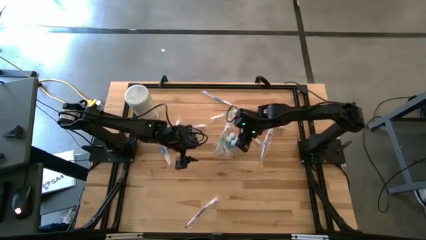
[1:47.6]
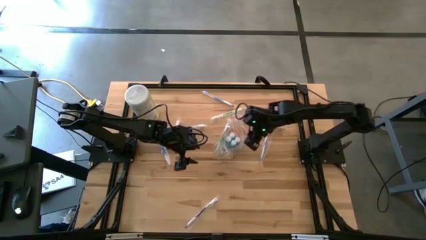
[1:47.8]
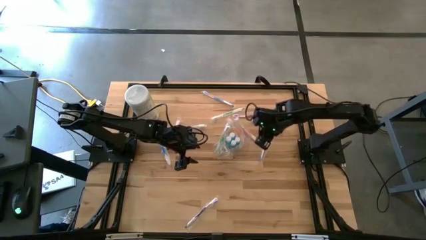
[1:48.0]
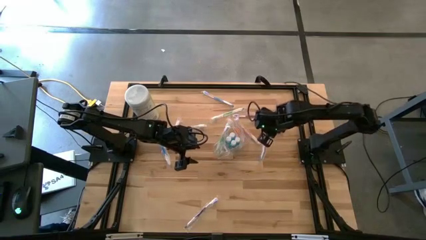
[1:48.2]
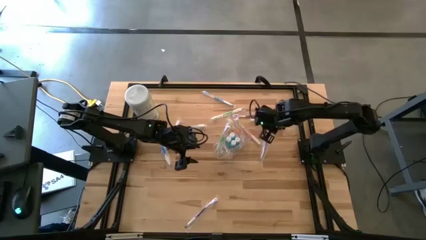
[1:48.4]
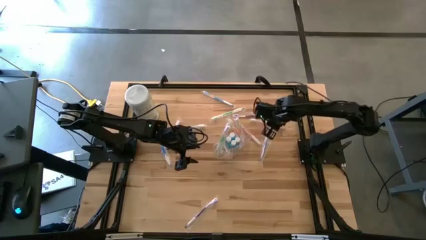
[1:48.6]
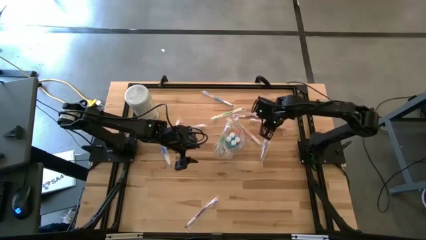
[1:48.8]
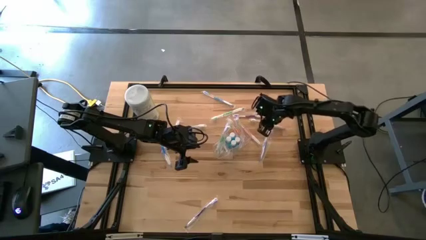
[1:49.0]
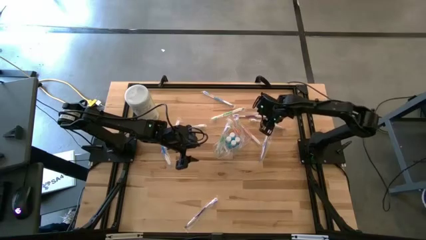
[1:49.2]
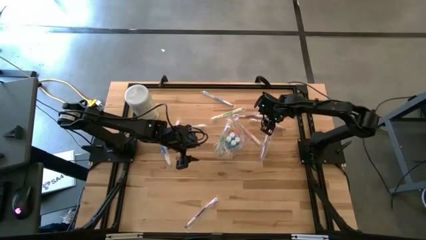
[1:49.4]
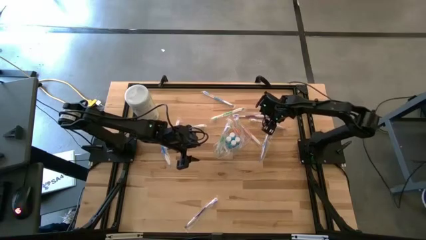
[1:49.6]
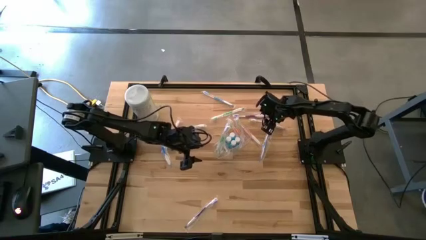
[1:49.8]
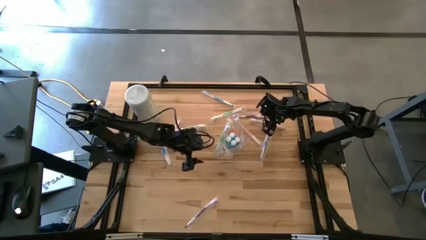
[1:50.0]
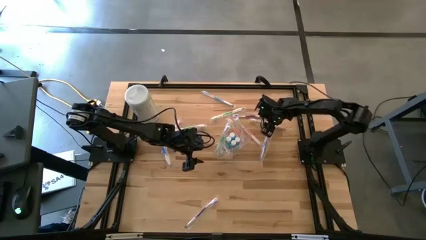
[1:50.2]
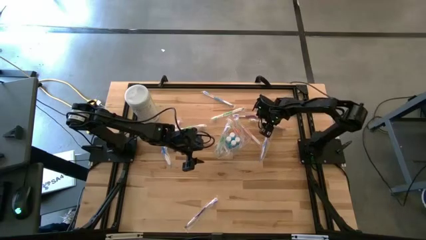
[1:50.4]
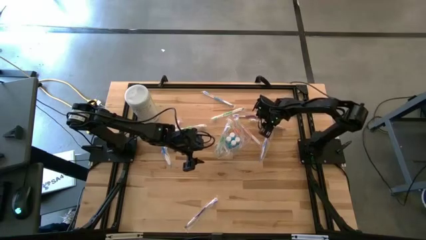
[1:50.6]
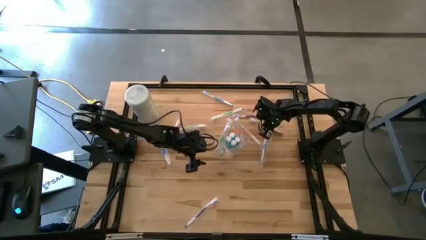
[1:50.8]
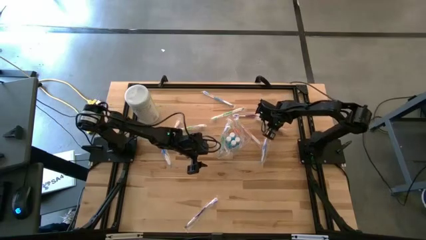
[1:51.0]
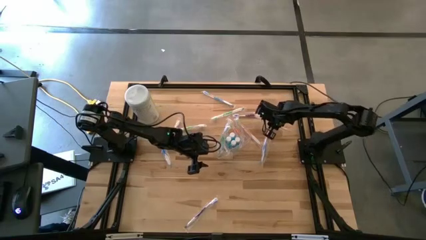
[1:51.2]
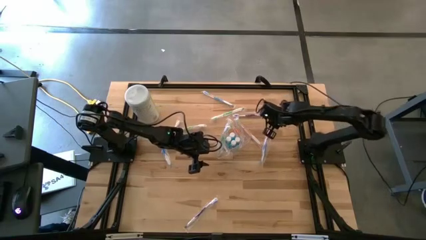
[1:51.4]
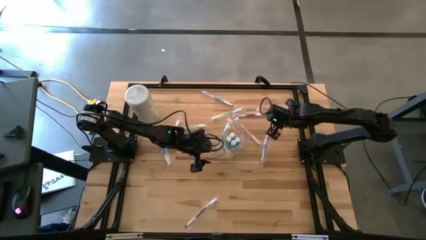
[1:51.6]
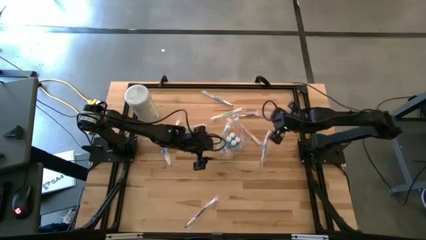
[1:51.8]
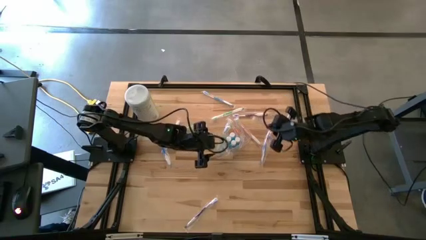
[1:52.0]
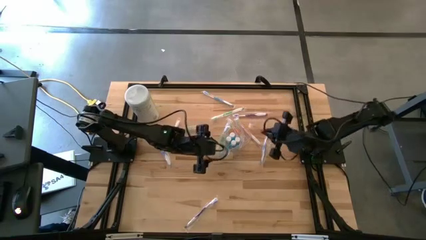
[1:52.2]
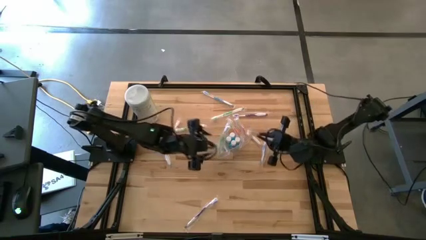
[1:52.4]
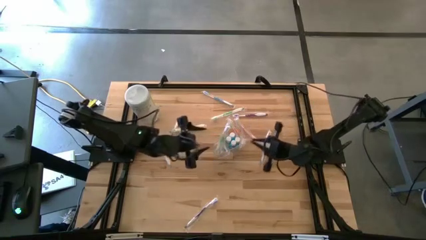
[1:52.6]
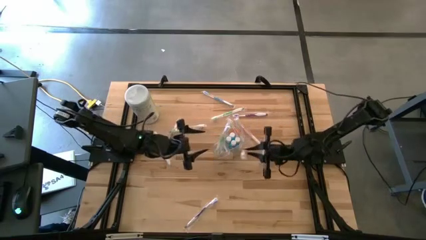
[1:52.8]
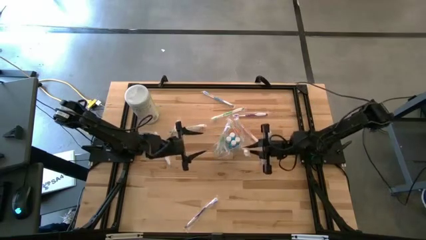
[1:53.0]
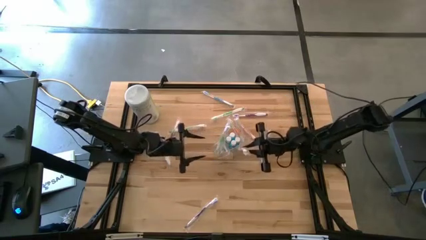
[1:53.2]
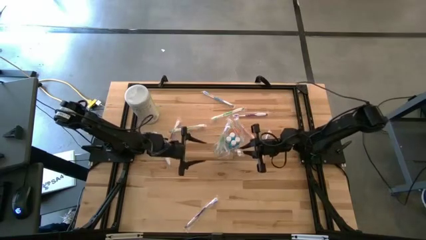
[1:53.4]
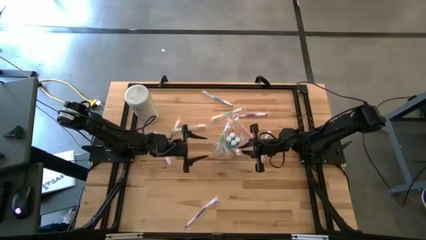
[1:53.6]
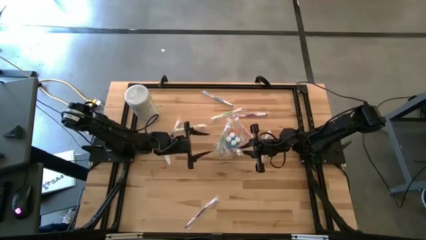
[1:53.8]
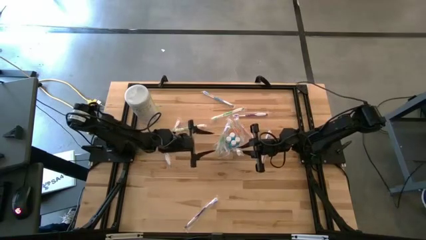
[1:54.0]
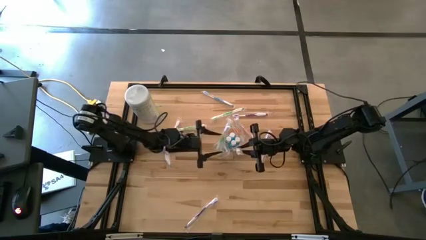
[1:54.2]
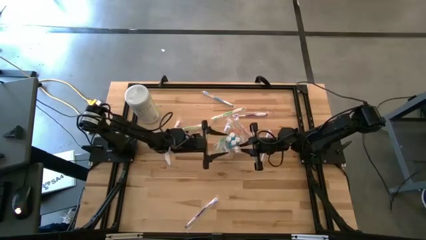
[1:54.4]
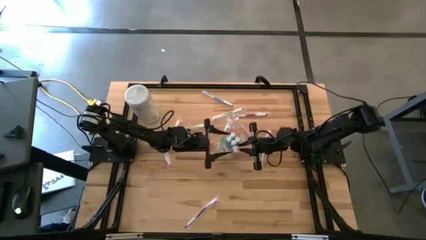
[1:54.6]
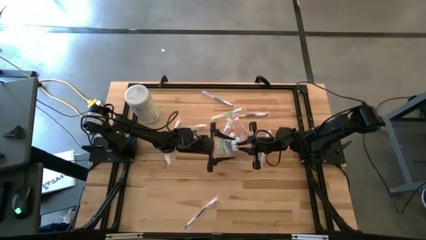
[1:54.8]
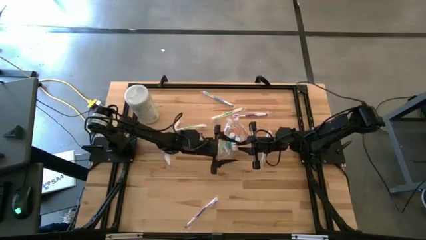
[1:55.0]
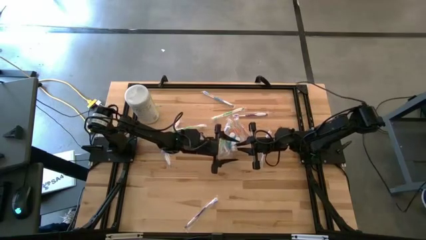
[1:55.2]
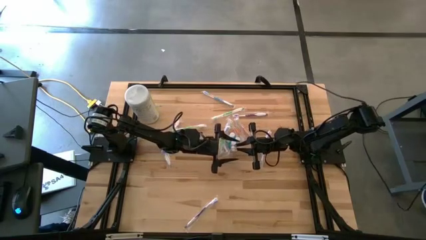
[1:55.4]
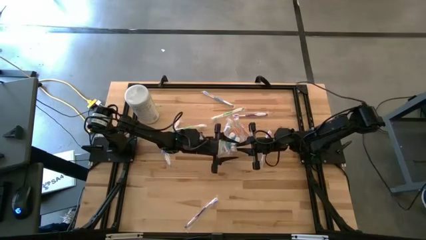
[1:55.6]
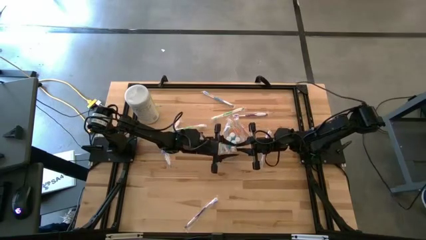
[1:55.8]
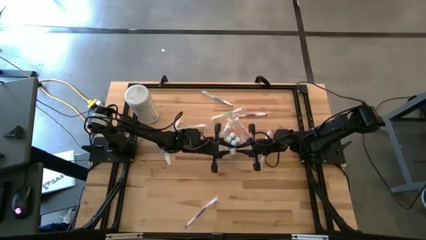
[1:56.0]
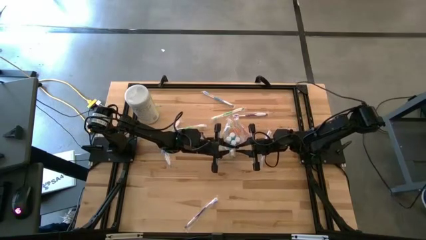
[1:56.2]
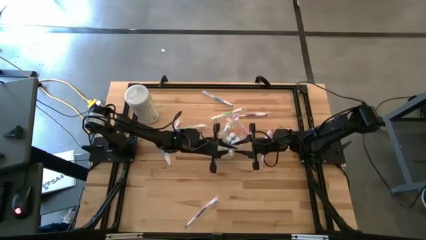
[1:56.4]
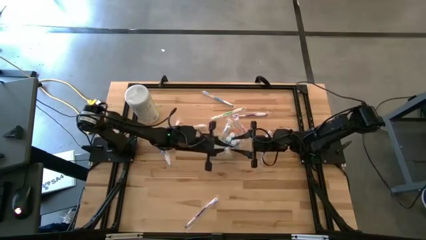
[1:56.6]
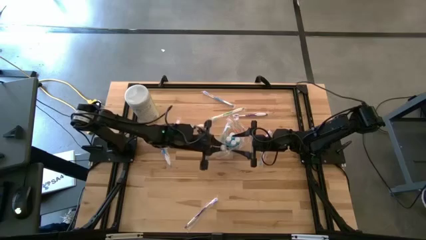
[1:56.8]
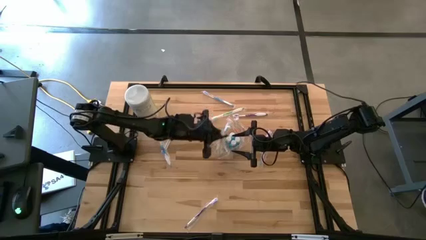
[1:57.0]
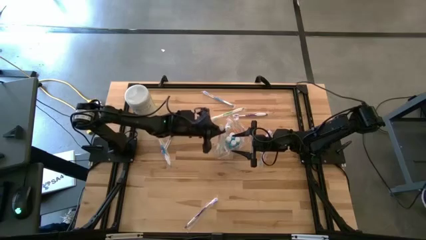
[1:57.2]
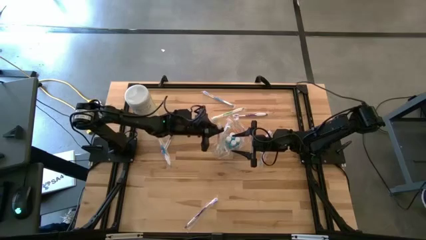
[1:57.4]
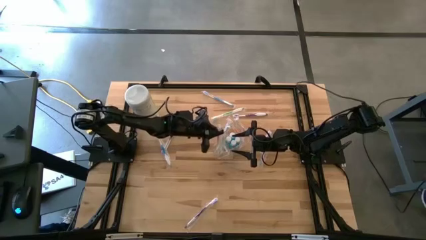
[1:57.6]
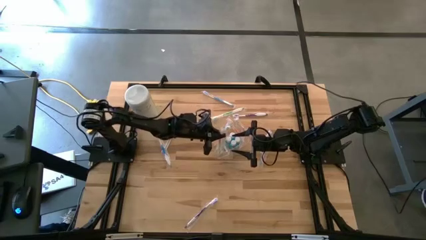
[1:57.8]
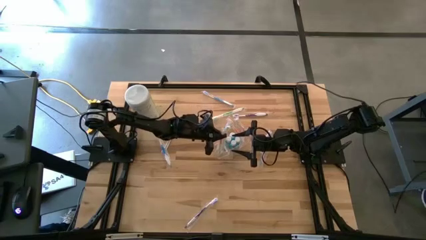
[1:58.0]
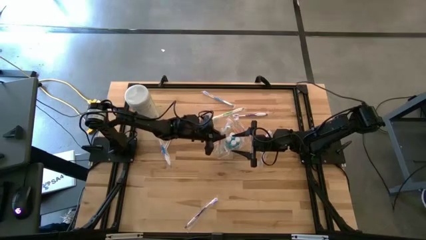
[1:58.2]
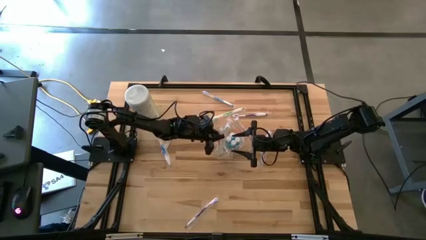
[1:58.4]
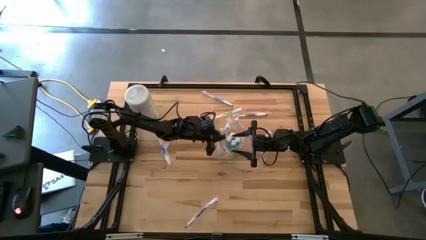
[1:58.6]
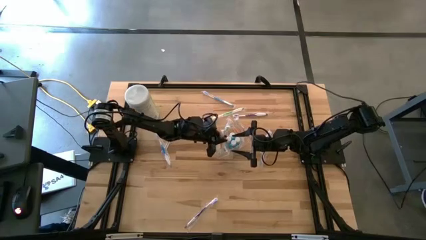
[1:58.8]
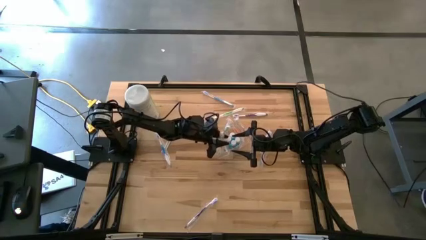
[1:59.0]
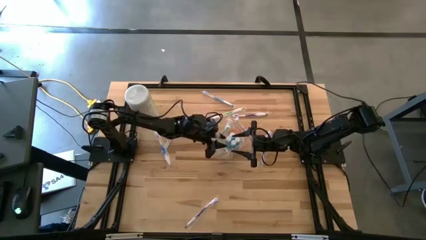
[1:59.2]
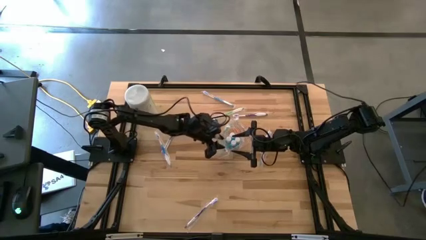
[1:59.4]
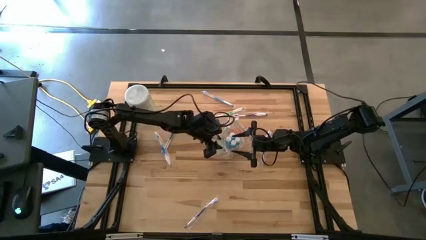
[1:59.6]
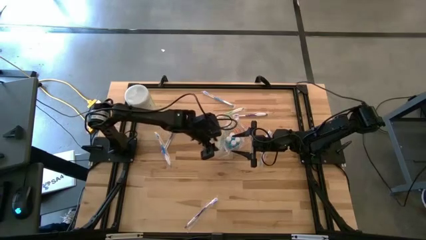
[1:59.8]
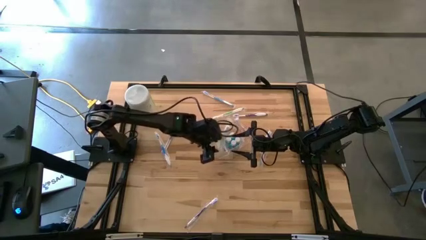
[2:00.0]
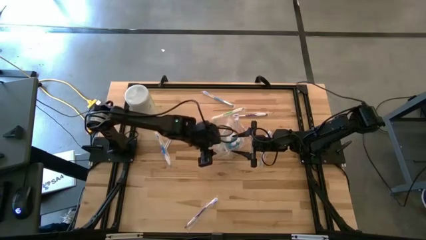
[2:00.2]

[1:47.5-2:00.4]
Task: Pick & Place toothbrushing station
Put the orange toothbrush into the transparent organizer

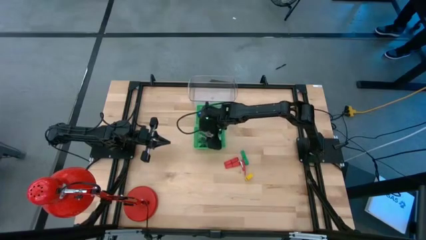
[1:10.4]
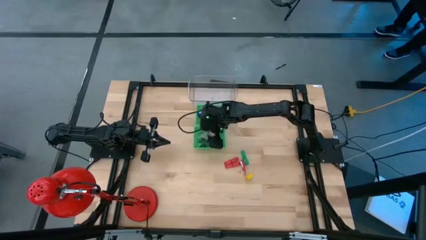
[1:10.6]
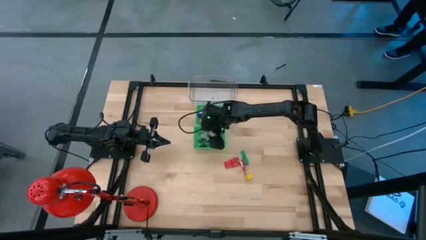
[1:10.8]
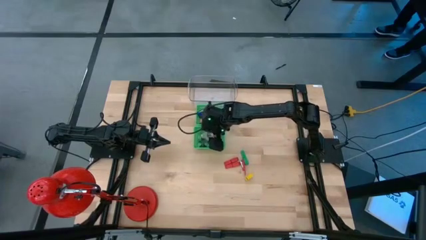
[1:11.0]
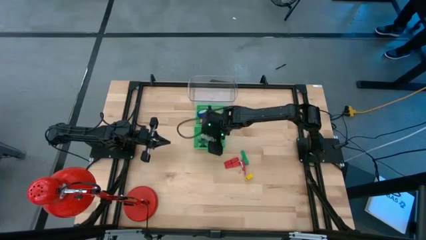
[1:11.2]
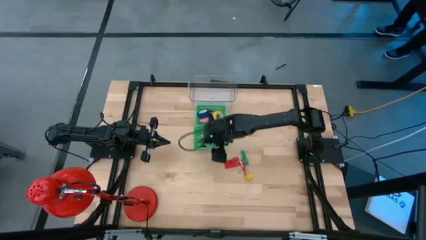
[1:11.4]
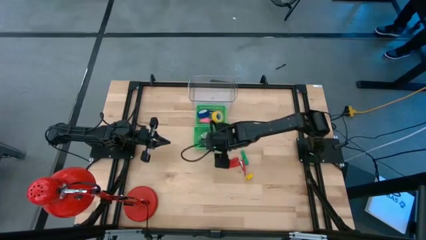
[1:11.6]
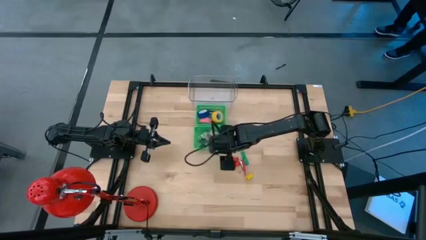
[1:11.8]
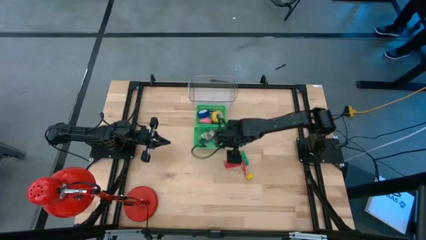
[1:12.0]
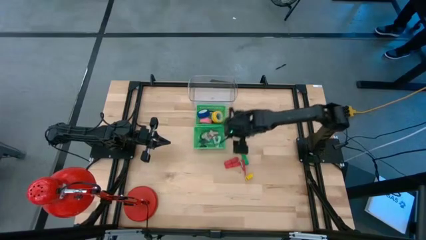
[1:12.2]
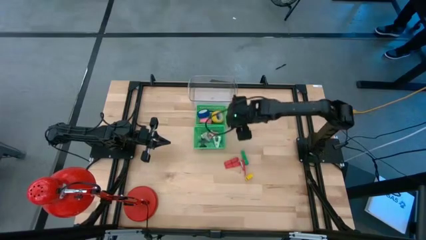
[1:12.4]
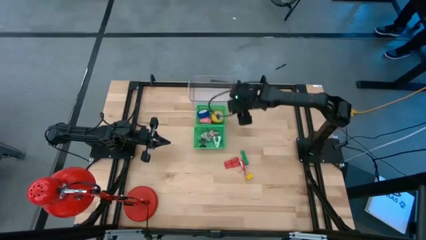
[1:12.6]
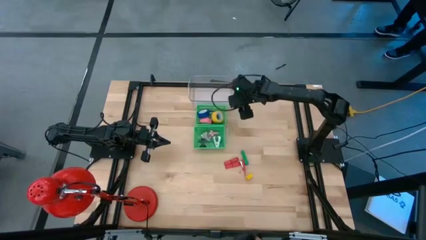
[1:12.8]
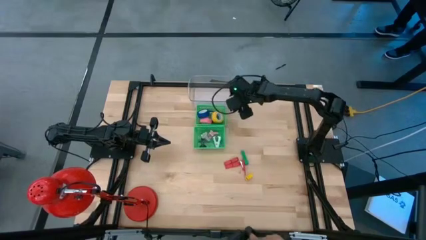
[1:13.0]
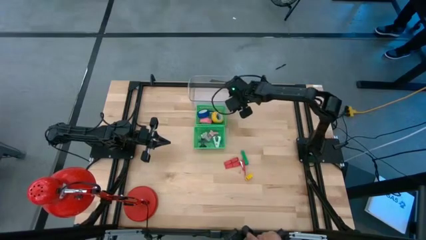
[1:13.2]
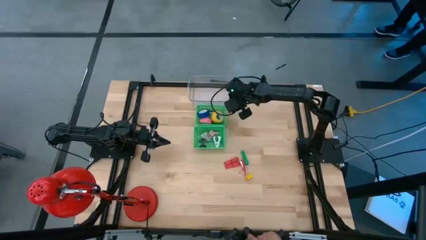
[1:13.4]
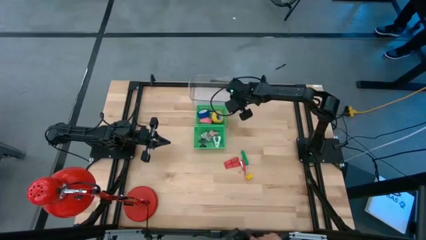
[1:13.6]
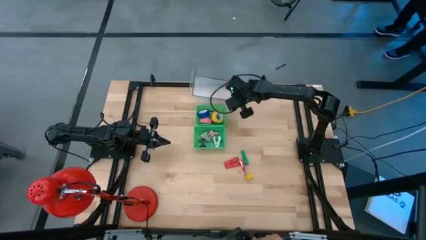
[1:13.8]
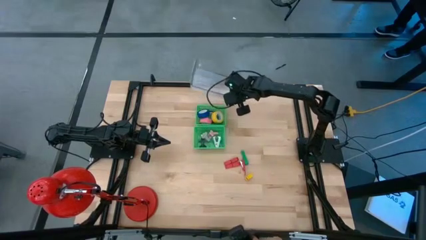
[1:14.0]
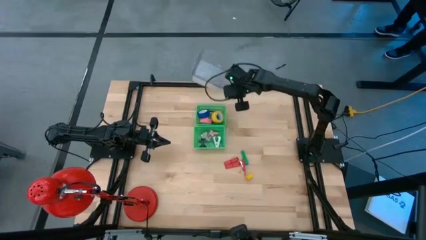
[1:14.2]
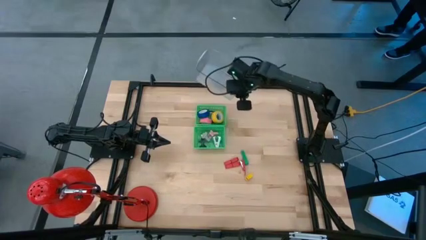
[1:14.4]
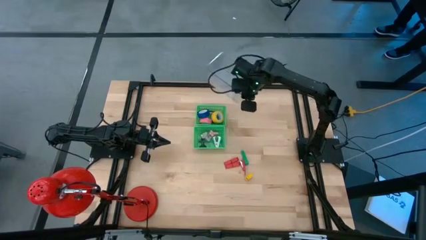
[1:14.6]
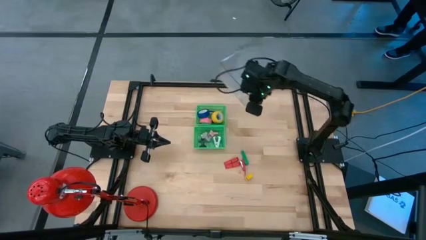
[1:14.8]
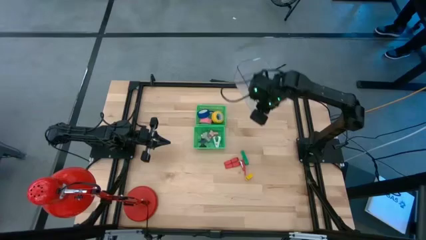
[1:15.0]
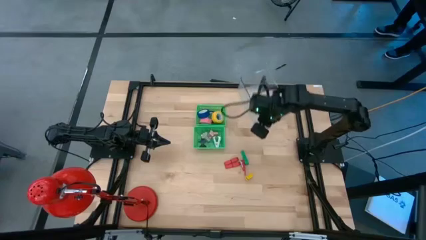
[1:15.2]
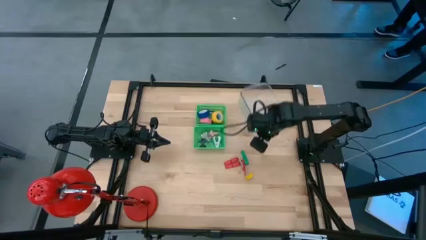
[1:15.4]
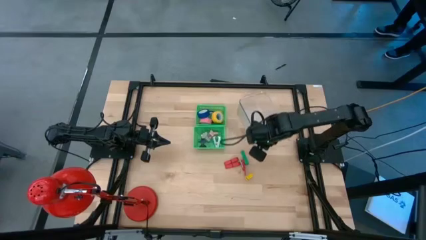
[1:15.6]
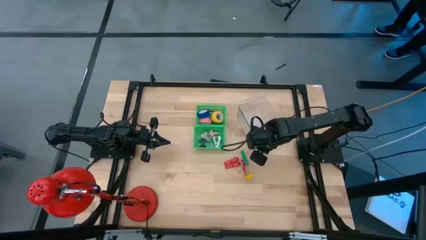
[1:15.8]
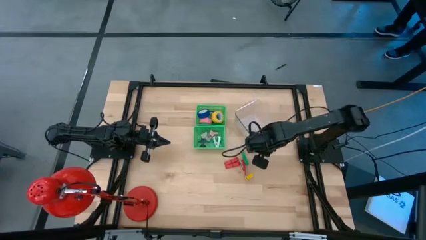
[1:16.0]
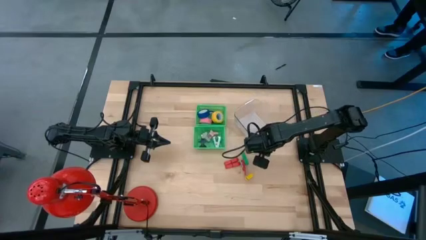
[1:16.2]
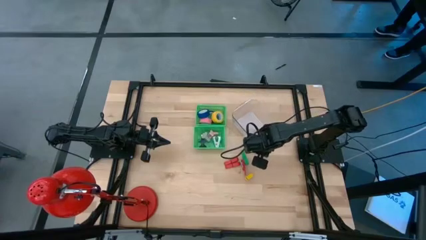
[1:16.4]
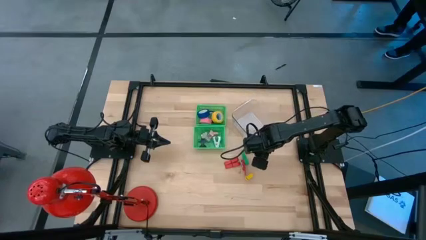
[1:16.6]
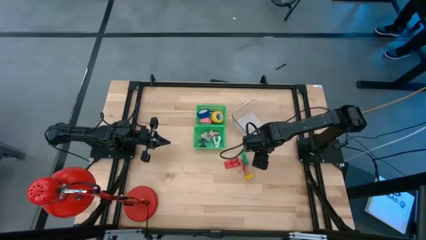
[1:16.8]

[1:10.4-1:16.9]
Task: Pick and place Stapler, Stapler remover, tape
Move the transparent bin to the top right of the table
